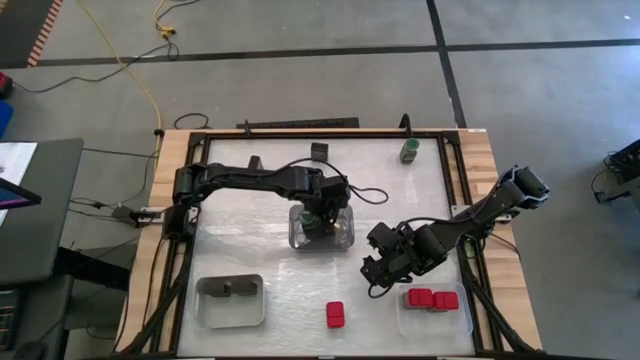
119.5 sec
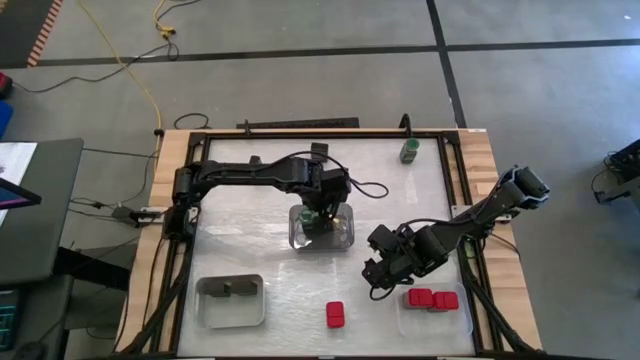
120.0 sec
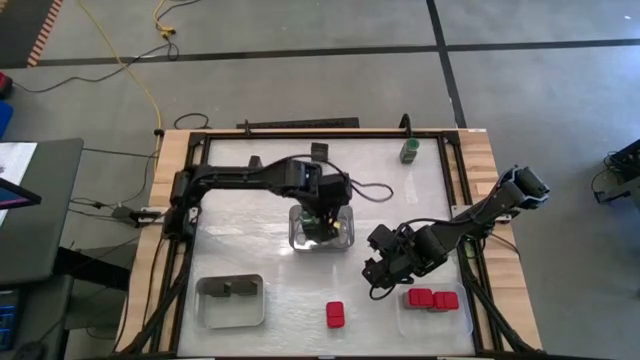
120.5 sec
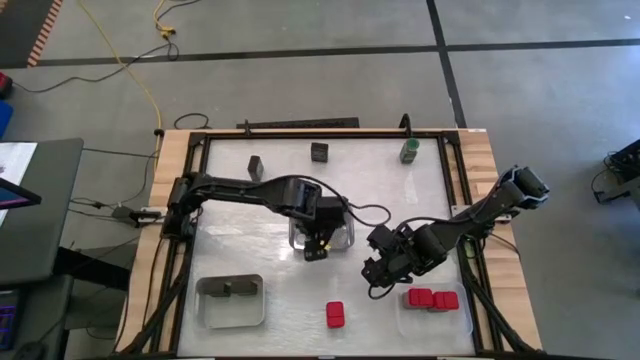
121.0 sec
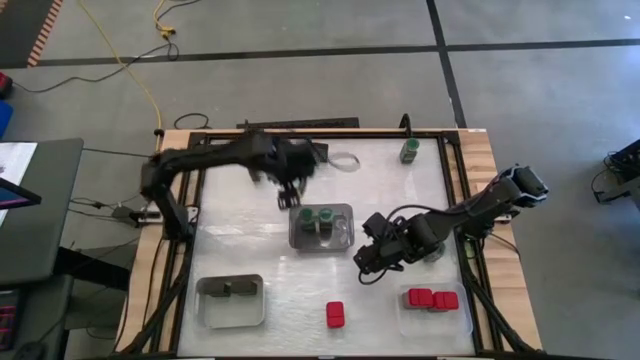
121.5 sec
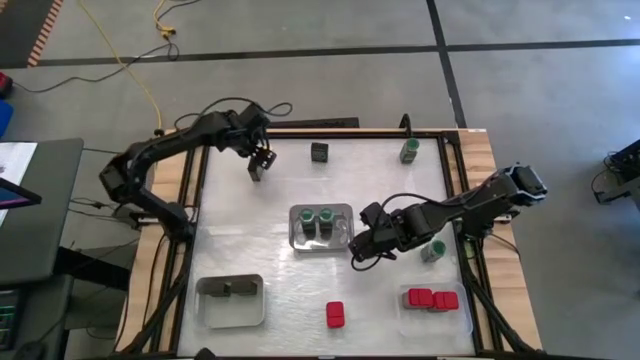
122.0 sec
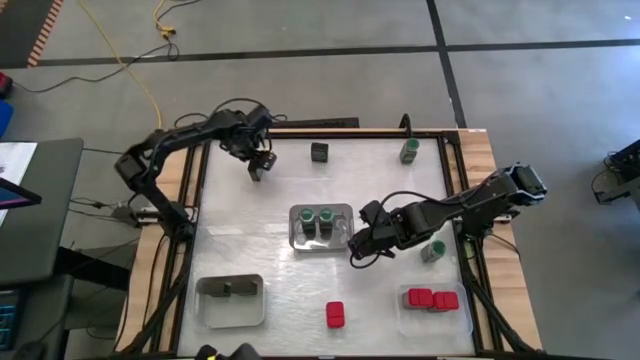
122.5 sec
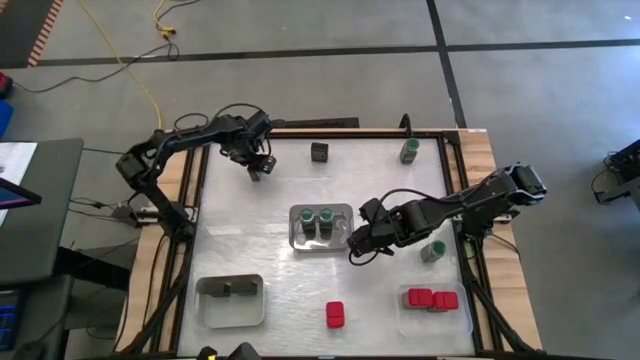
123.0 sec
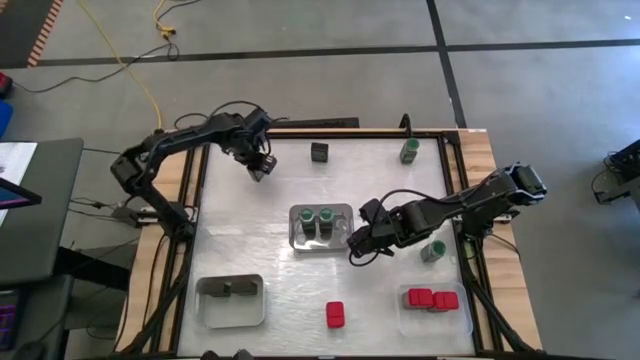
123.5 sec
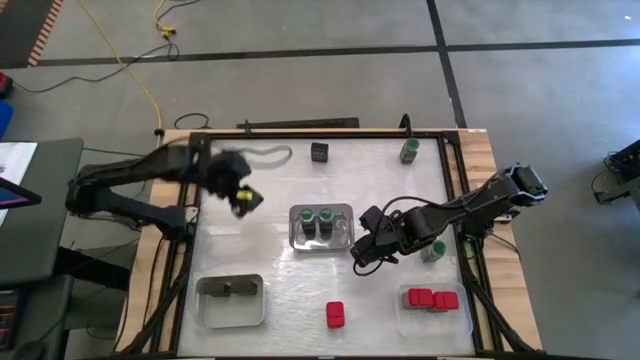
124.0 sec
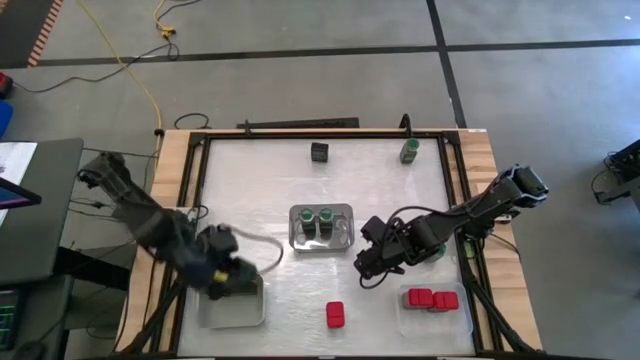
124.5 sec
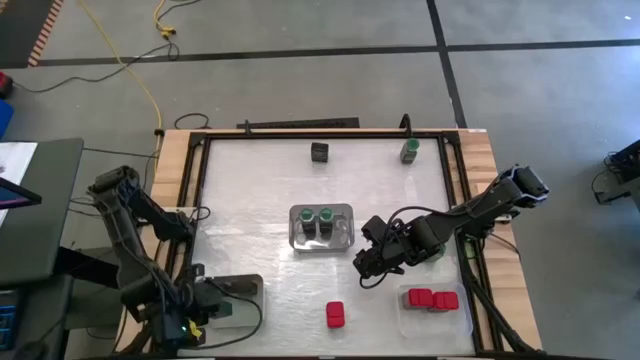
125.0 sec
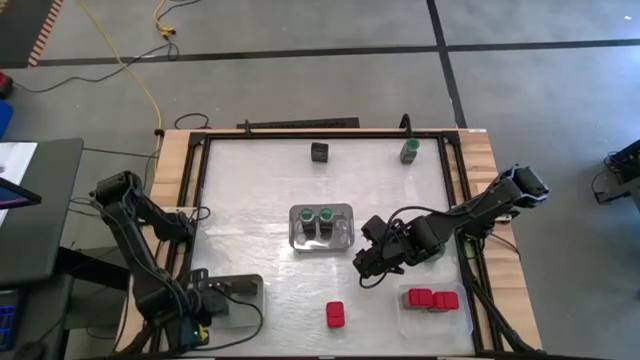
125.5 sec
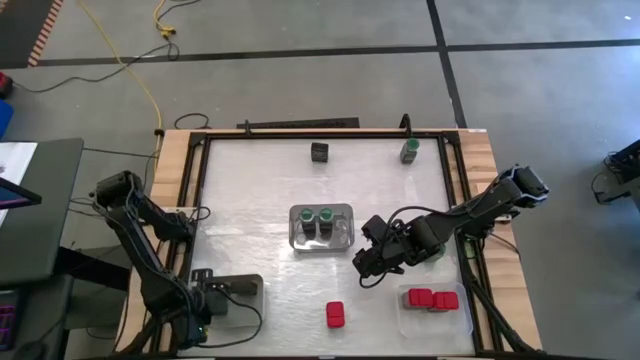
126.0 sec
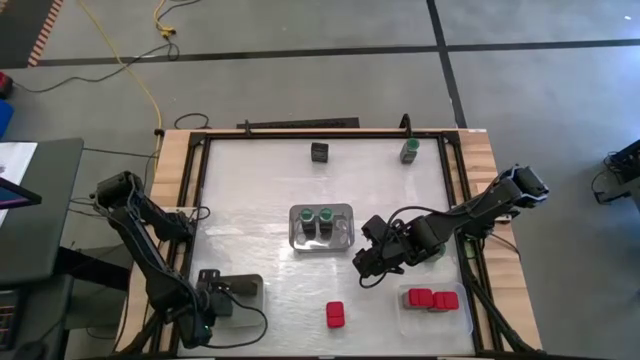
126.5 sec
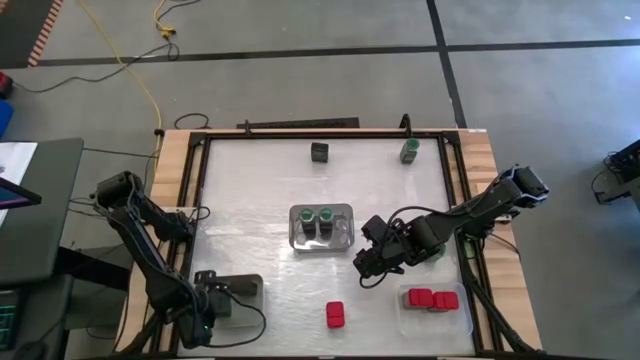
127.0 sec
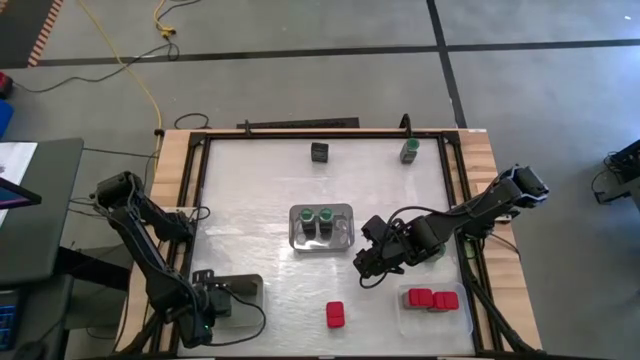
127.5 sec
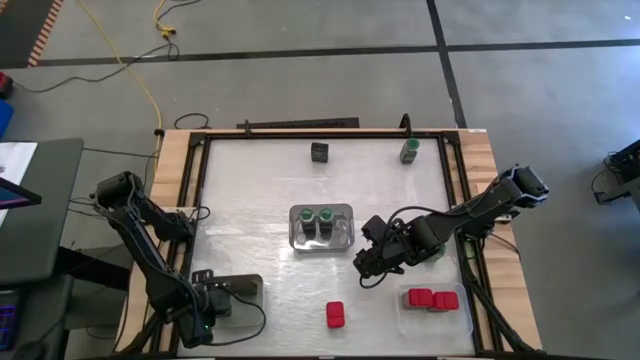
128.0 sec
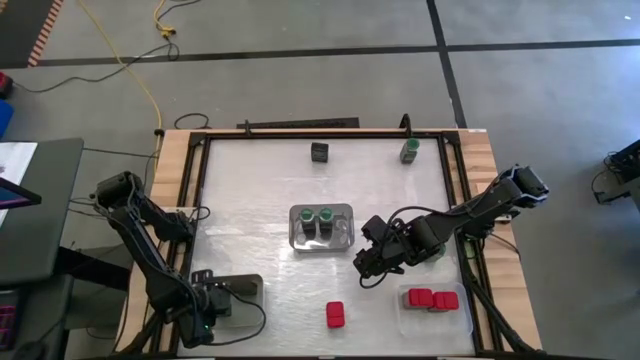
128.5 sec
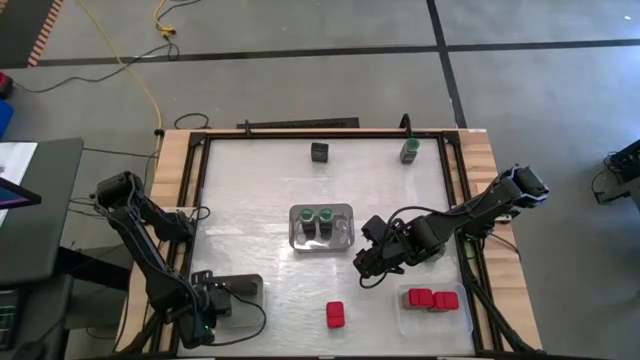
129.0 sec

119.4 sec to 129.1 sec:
Task: Sort spices by type
Put the left black seasoning can into the grey bin

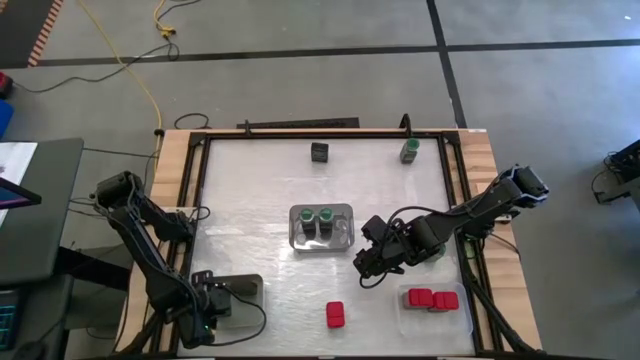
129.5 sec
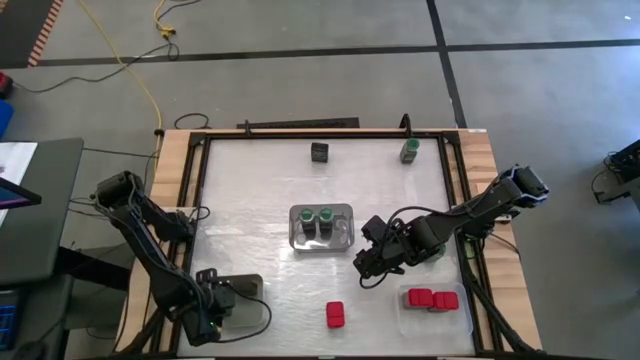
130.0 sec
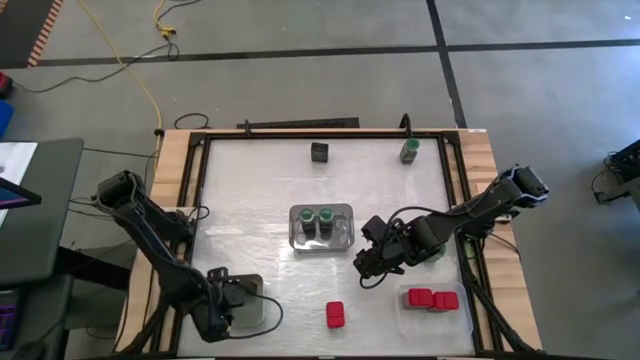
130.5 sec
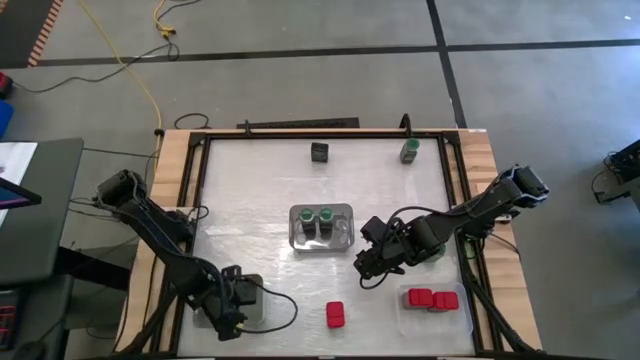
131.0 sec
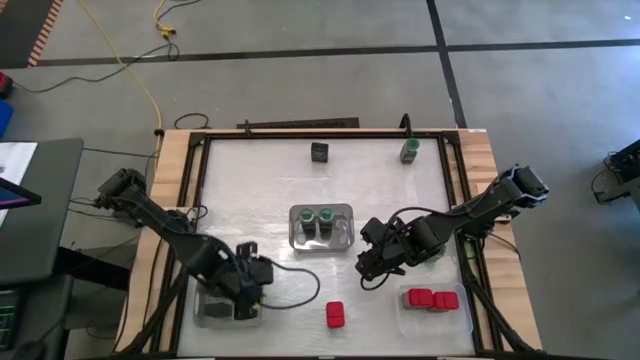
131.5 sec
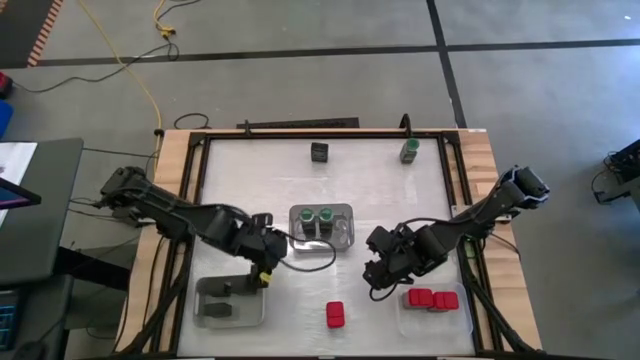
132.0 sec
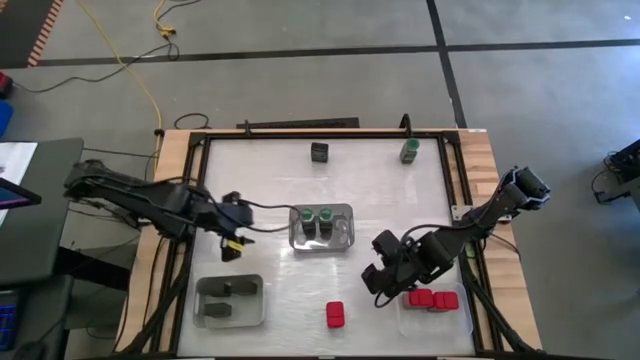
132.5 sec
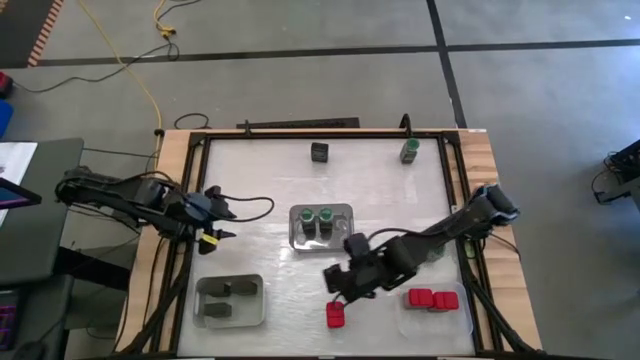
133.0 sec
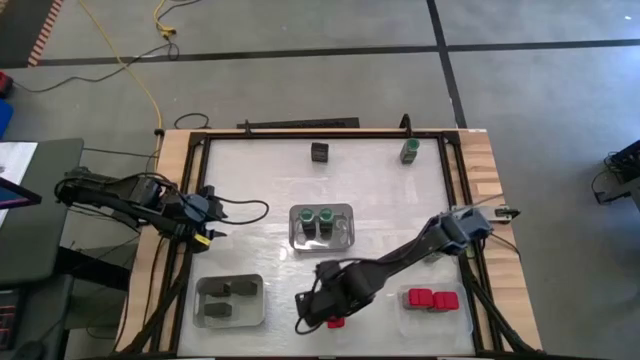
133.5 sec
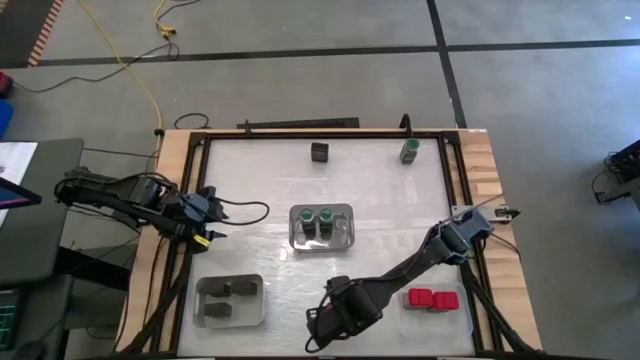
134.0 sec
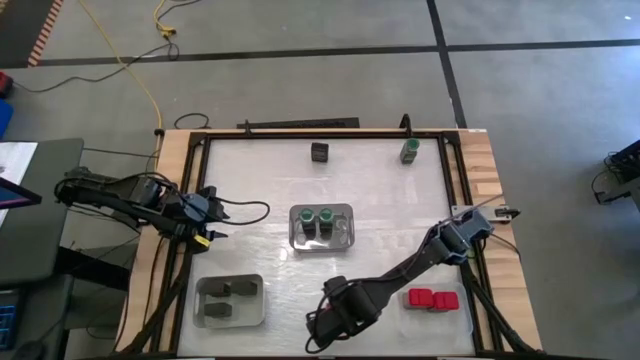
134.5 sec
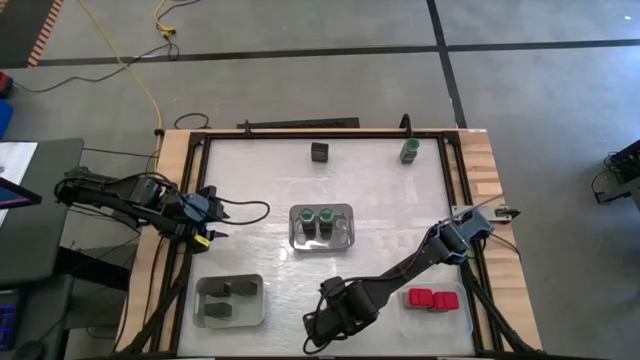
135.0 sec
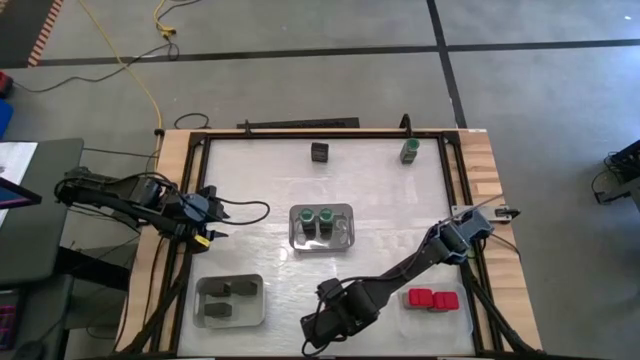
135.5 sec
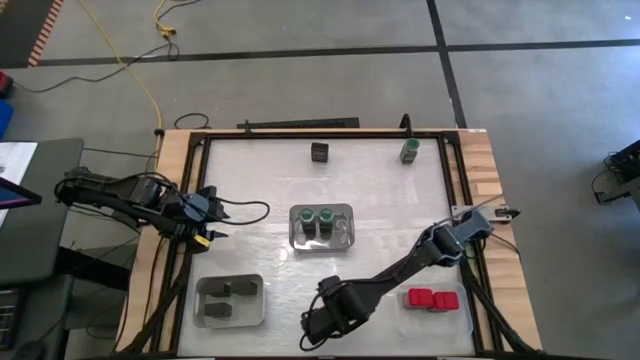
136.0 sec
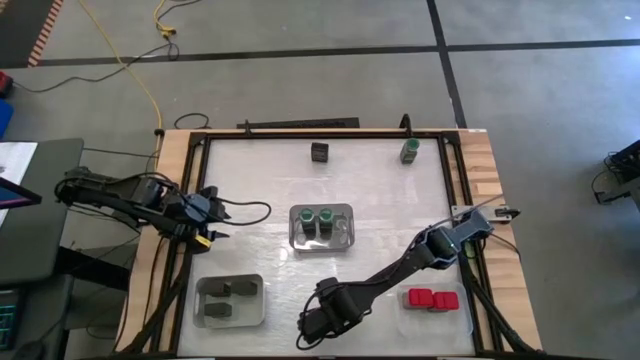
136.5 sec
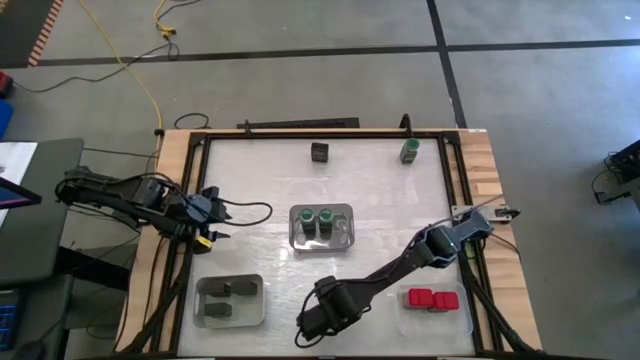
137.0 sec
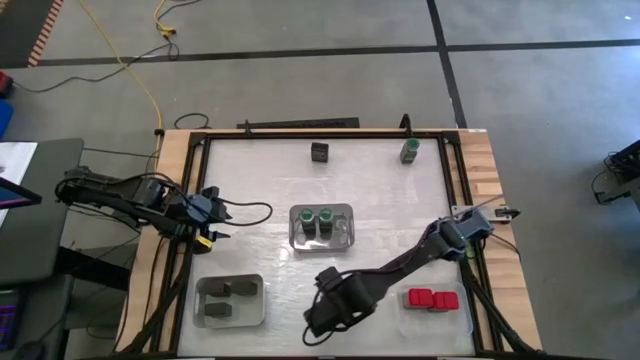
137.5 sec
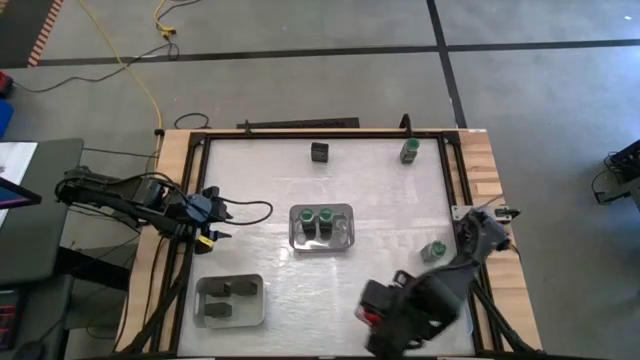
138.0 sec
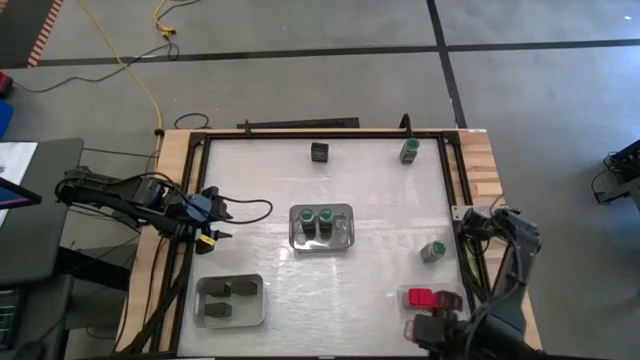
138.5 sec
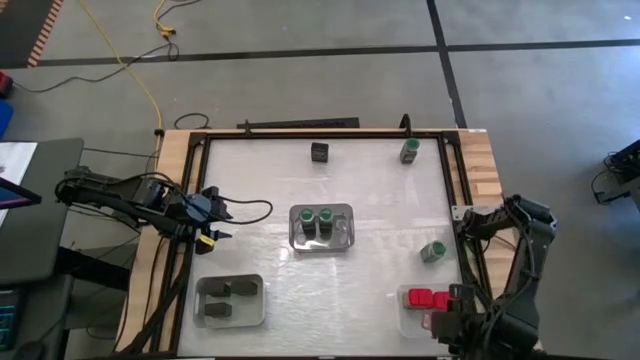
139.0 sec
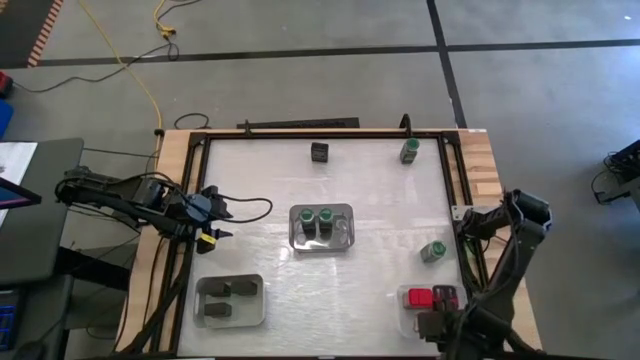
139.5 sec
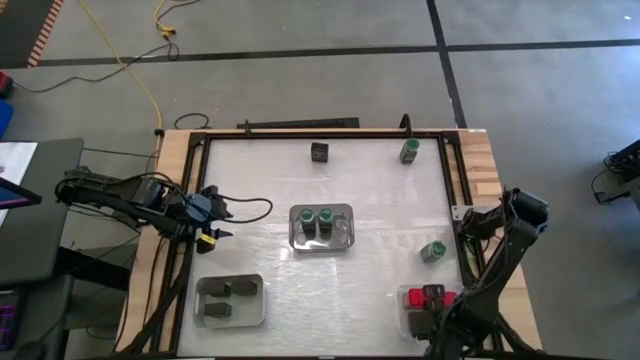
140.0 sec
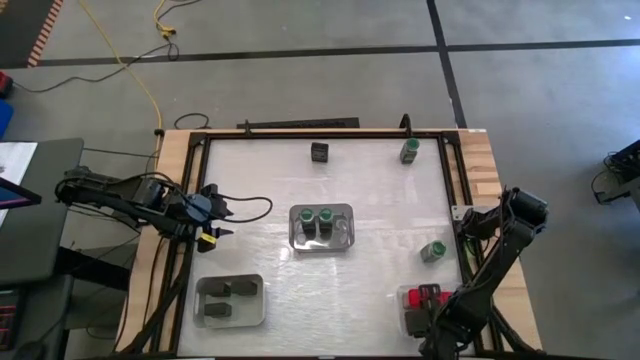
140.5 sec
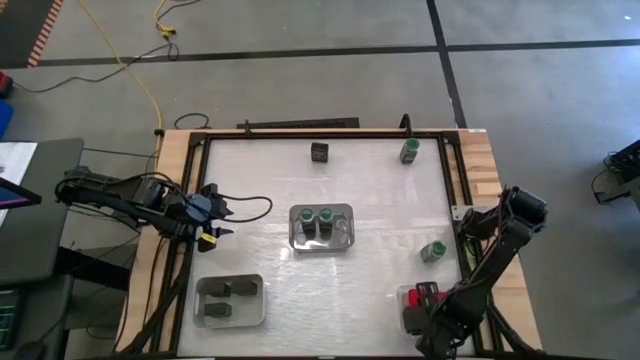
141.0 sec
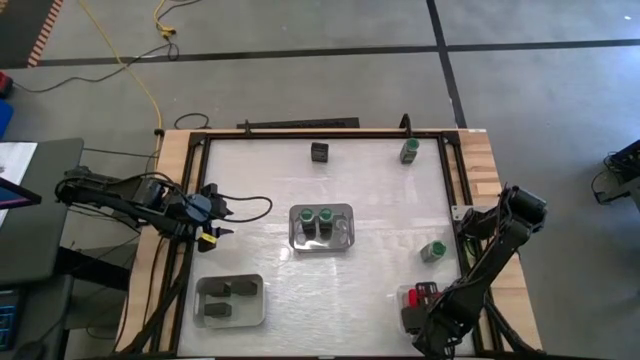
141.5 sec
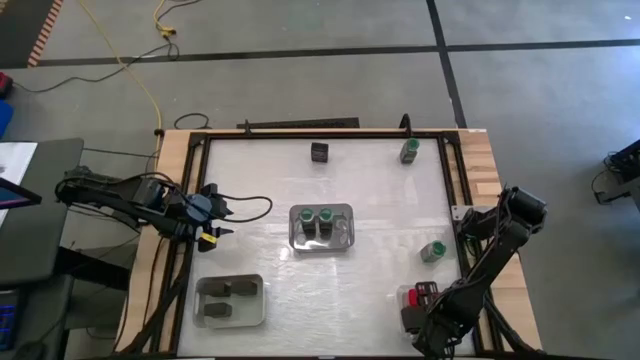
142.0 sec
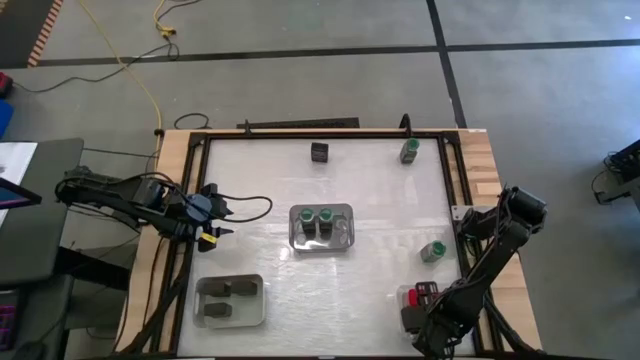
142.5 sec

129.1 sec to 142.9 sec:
Put the red seasoning can into the transparent bin
